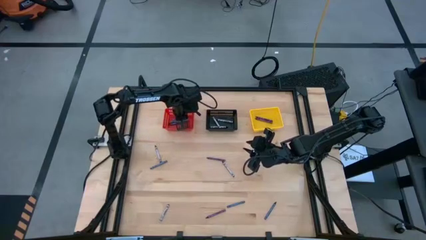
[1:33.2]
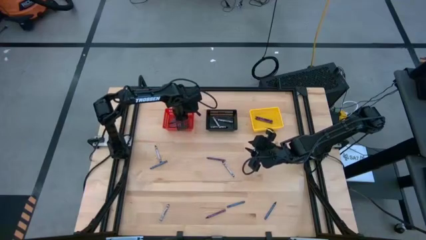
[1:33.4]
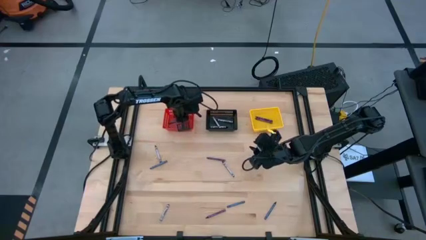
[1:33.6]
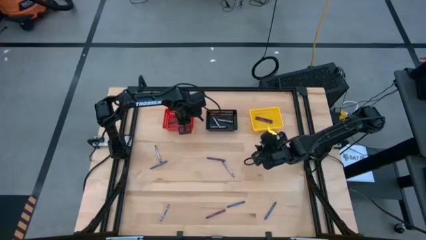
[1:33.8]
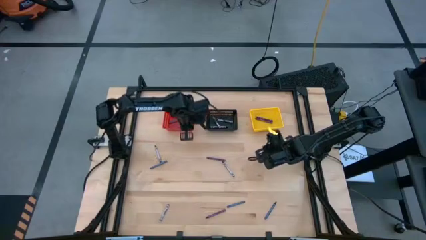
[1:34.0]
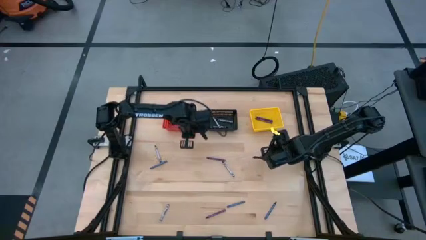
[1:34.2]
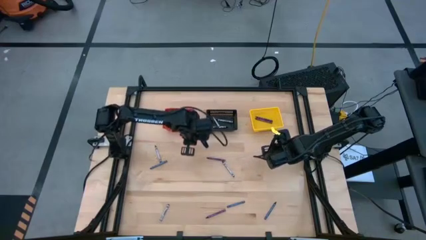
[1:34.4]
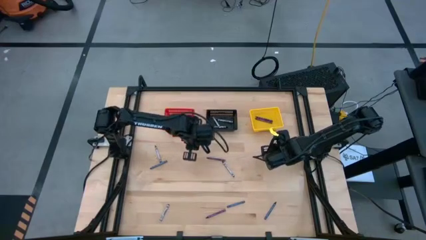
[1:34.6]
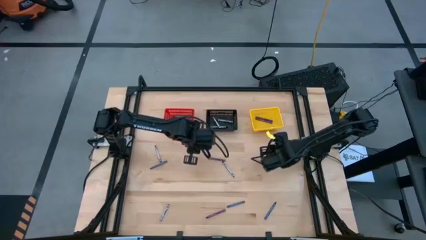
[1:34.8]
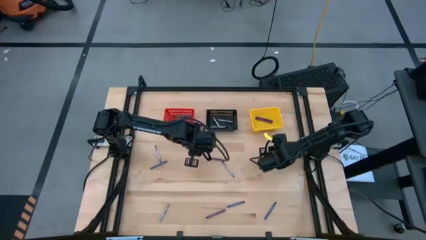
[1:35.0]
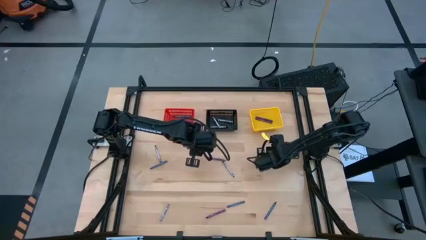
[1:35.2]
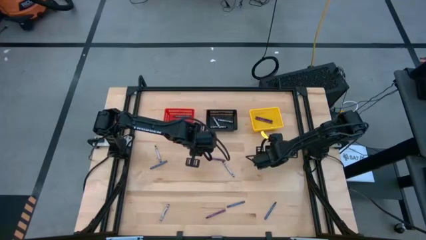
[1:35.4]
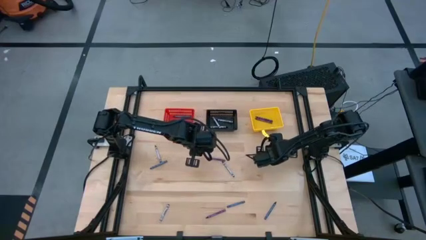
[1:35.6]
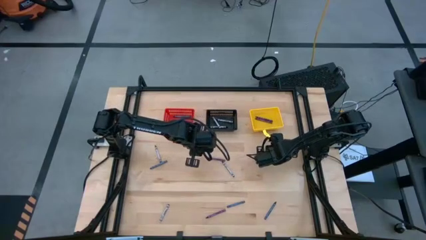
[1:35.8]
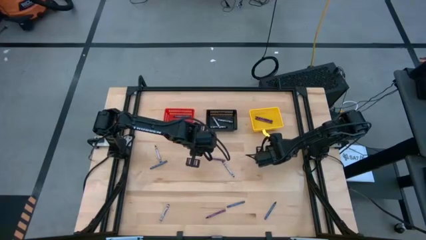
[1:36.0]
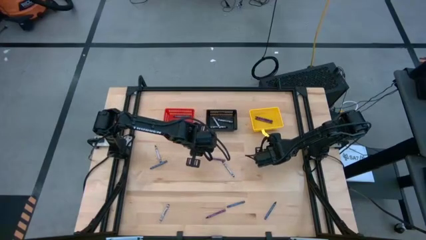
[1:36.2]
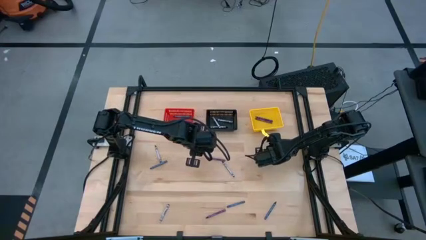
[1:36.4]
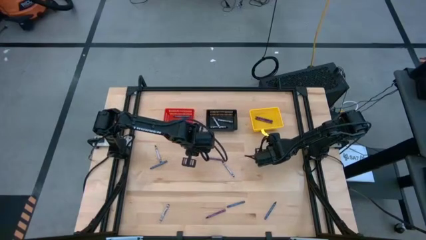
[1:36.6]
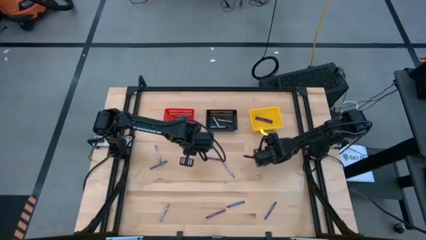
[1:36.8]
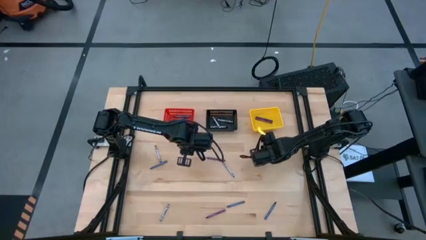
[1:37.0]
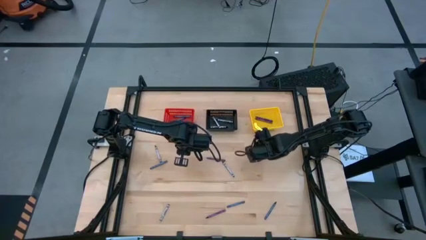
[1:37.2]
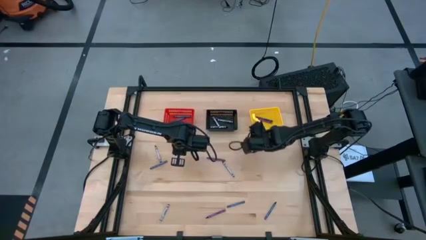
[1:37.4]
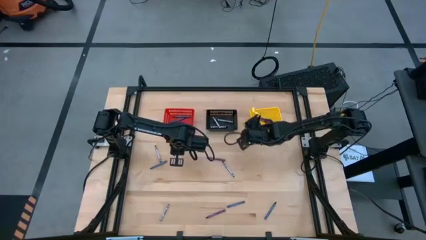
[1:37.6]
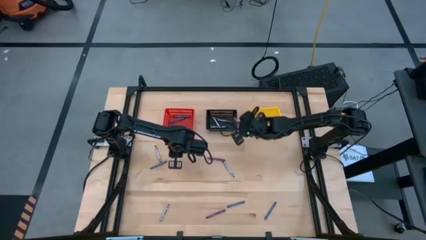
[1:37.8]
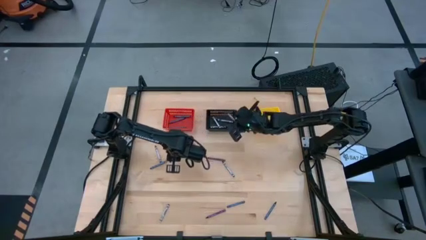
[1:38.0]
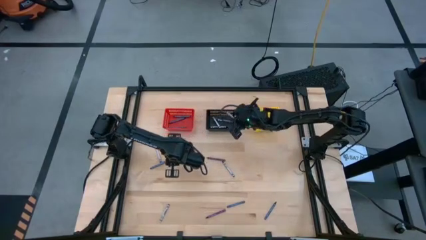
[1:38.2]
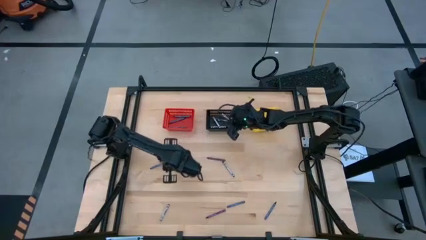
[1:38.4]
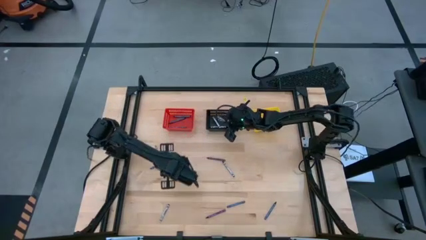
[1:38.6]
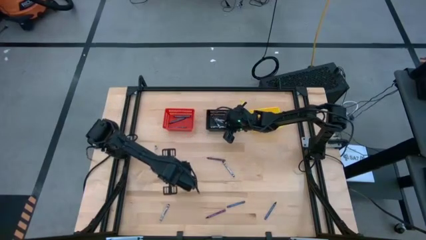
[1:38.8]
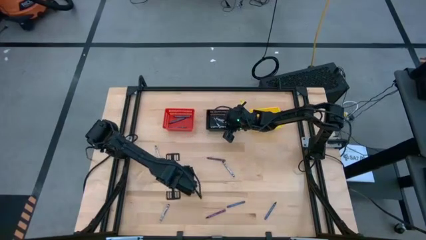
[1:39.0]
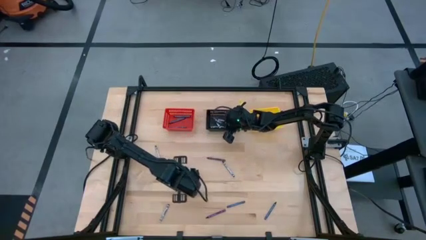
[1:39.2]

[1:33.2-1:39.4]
Task: Sort crayons
Put the black crayon into the black basket

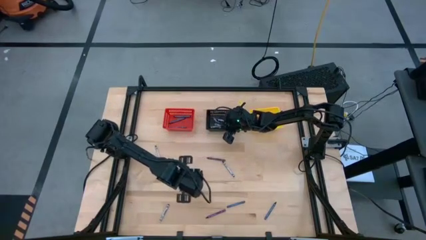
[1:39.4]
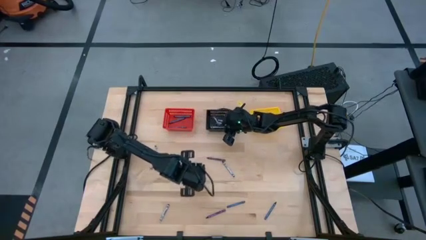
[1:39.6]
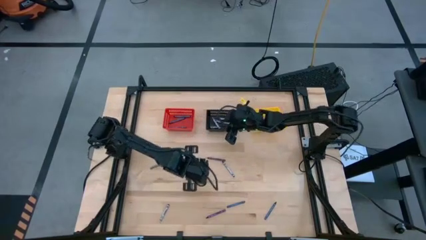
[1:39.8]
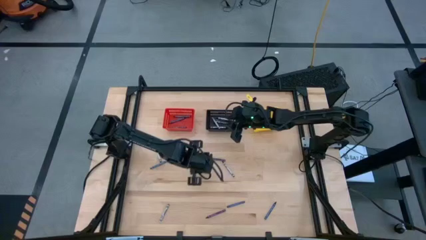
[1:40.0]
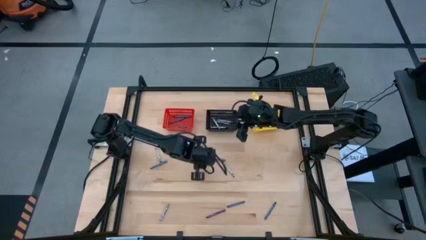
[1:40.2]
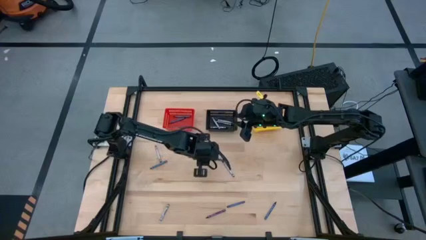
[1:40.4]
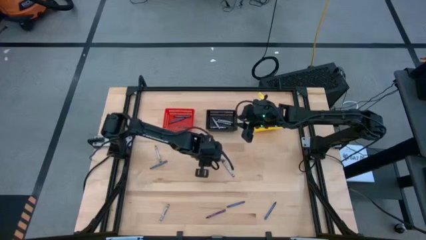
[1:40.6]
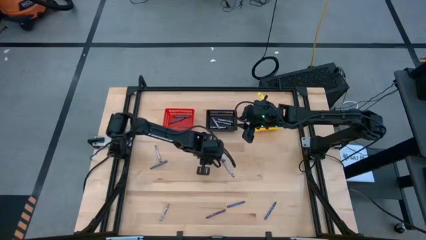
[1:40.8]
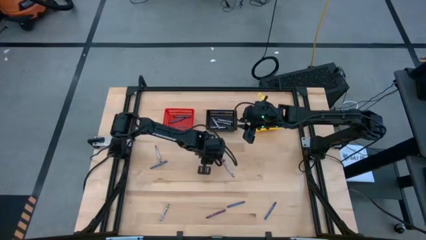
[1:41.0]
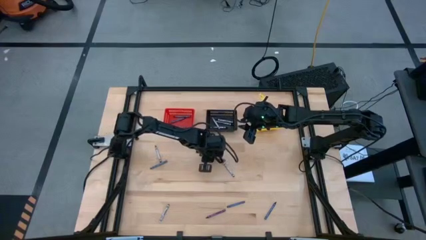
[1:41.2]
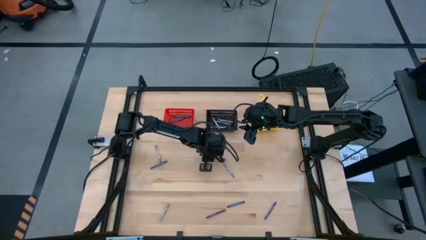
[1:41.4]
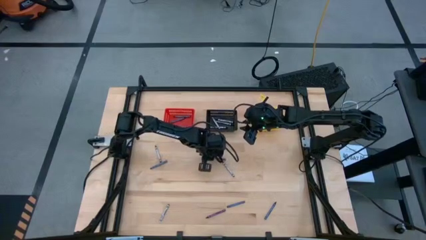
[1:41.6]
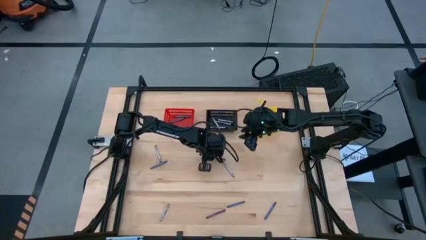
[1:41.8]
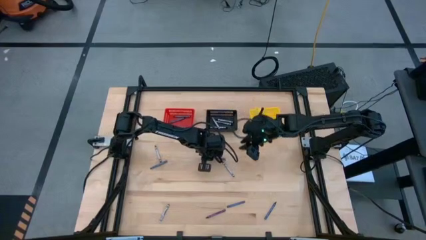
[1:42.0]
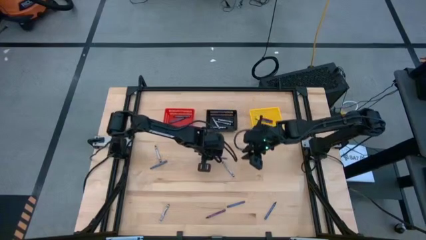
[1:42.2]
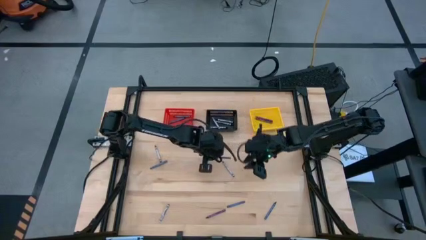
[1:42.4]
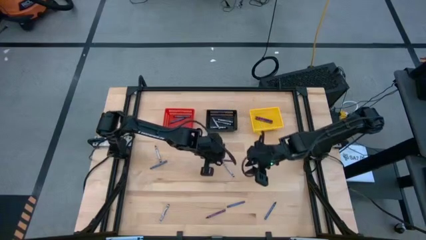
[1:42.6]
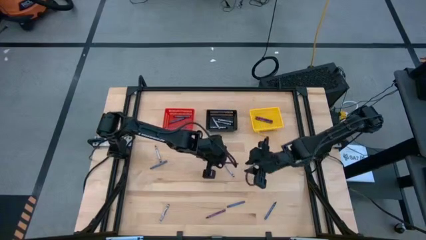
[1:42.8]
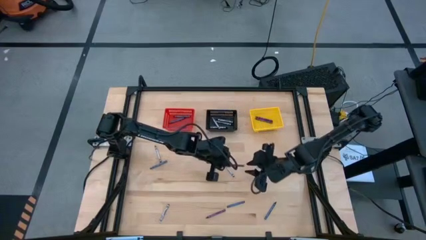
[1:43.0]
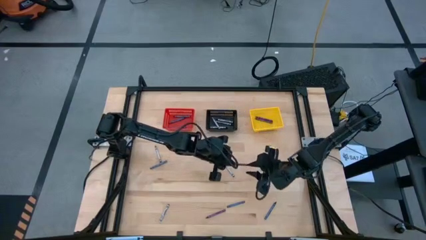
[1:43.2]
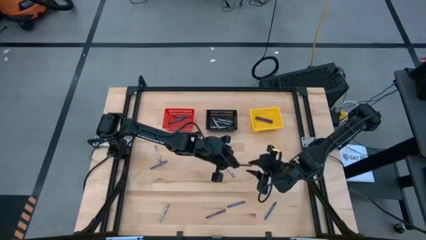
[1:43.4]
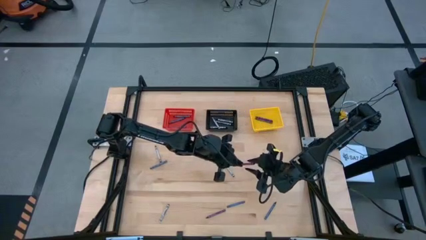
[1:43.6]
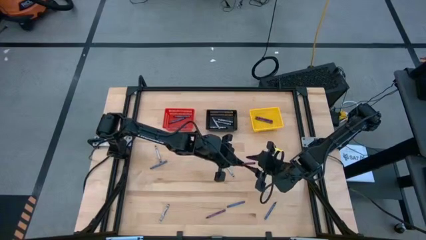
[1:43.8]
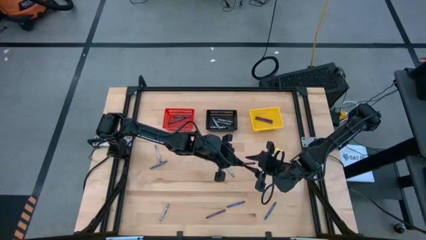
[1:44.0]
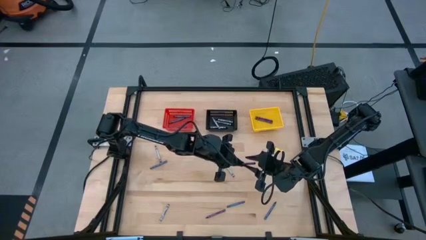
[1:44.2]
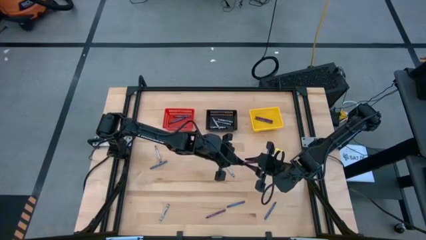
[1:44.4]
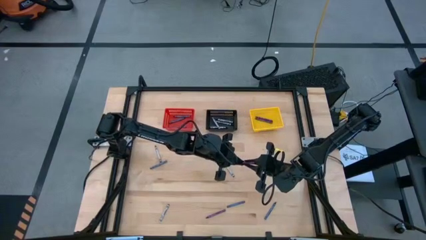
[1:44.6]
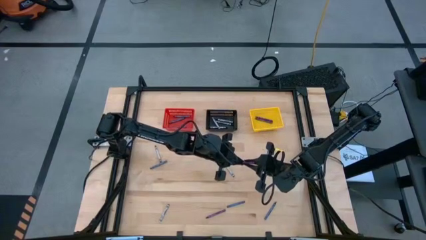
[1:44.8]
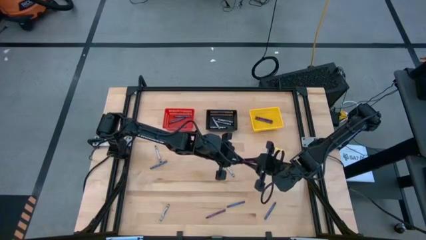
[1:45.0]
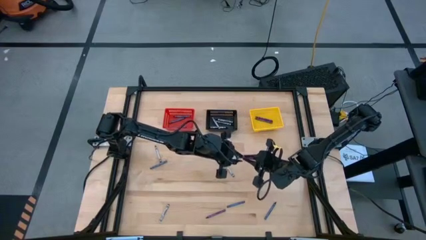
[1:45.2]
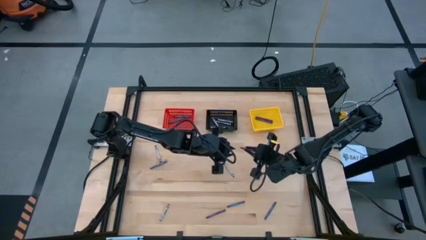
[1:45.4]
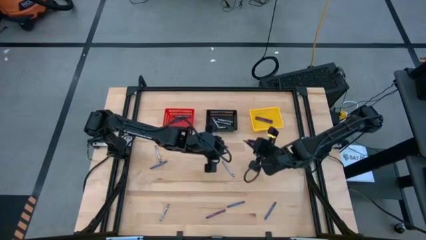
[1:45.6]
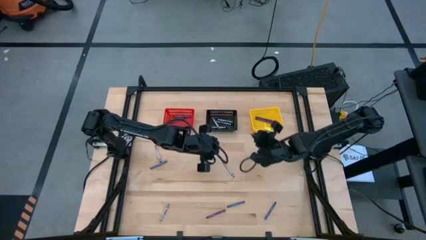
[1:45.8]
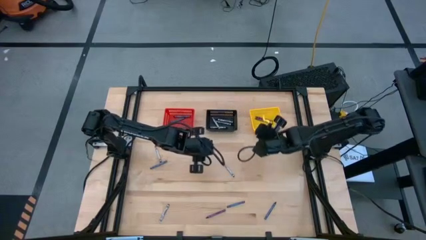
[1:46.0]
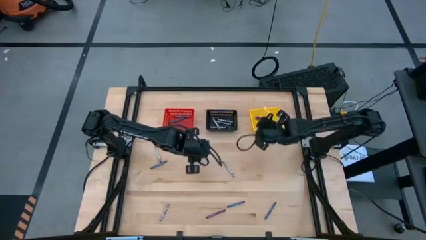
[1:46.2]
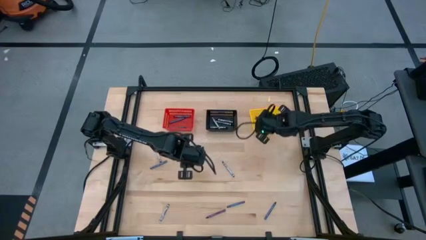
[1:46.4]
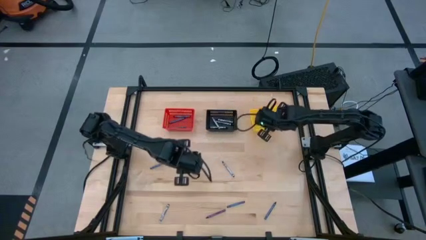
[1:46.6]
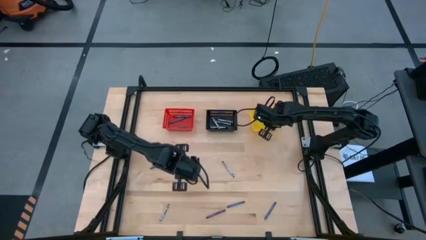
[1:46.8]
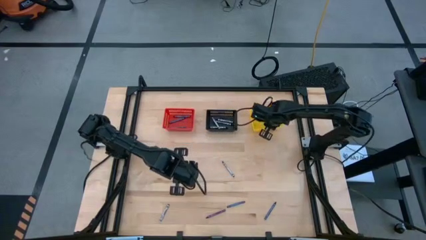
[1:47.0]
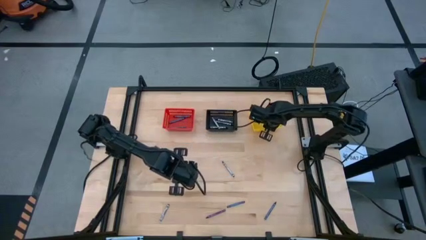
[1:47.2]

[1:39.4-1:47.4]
Put the purple crayon into the yellow basket
